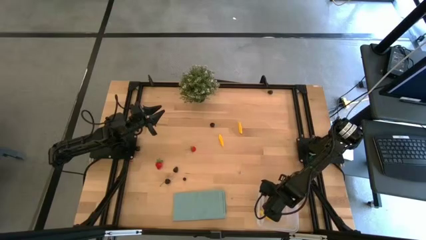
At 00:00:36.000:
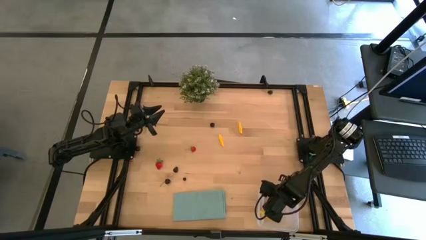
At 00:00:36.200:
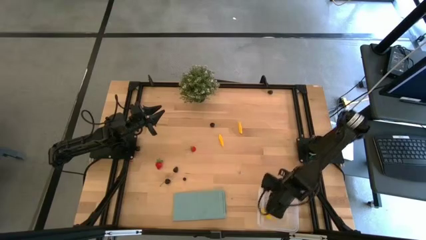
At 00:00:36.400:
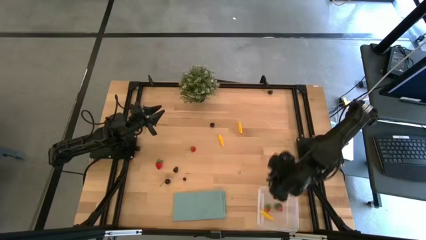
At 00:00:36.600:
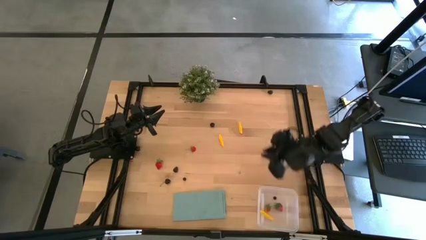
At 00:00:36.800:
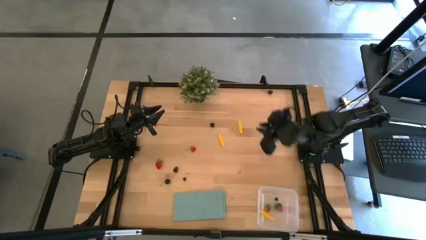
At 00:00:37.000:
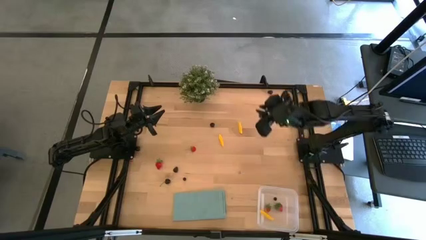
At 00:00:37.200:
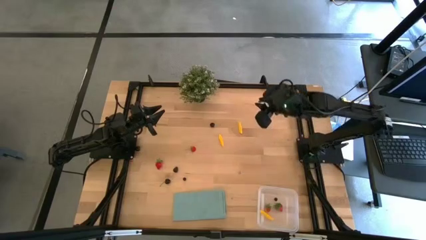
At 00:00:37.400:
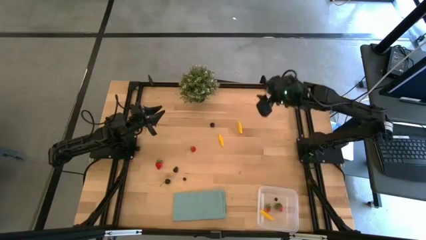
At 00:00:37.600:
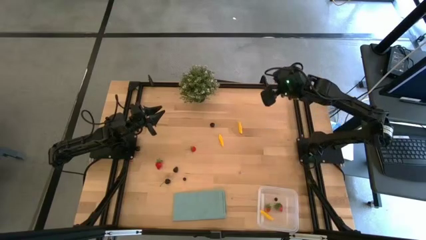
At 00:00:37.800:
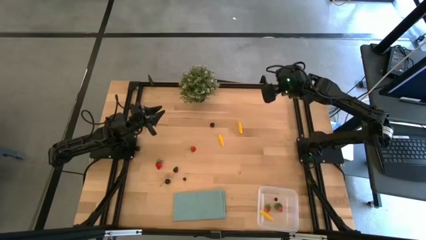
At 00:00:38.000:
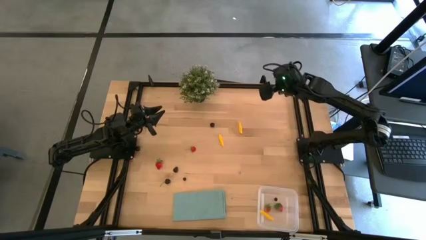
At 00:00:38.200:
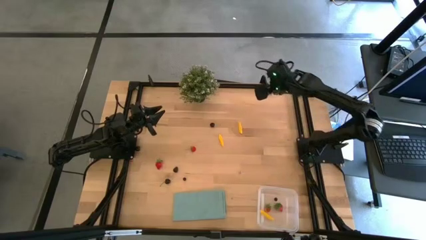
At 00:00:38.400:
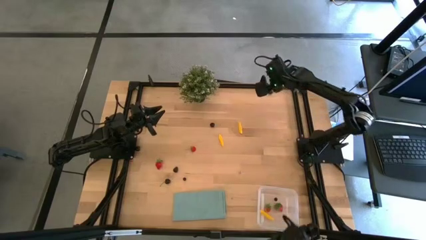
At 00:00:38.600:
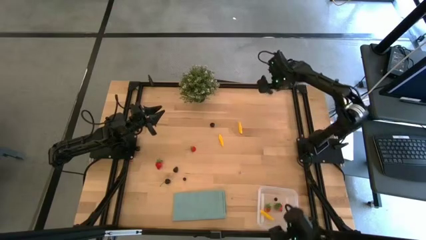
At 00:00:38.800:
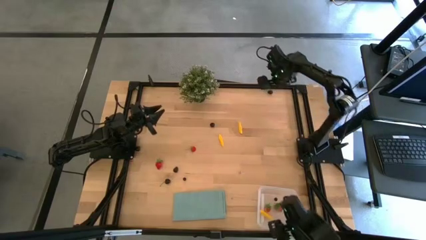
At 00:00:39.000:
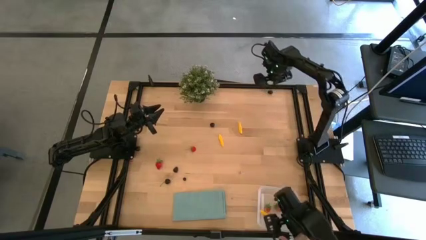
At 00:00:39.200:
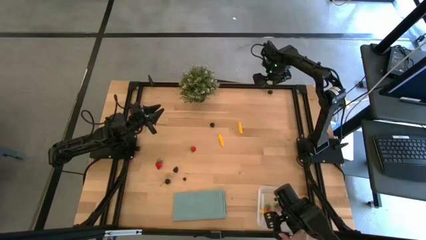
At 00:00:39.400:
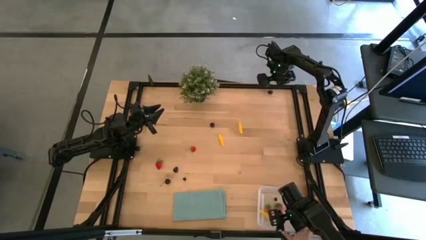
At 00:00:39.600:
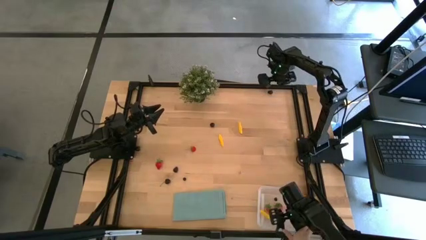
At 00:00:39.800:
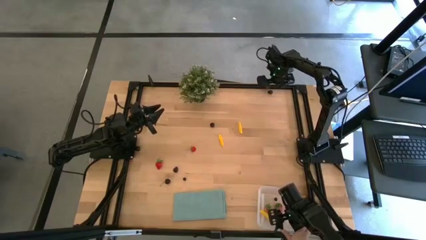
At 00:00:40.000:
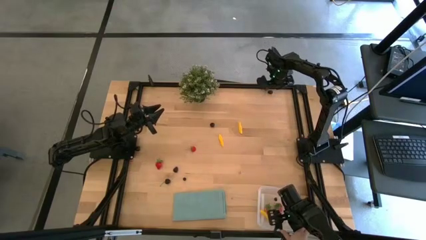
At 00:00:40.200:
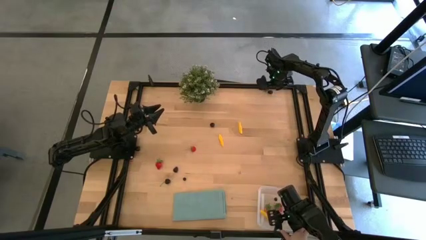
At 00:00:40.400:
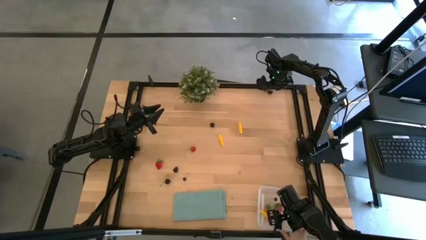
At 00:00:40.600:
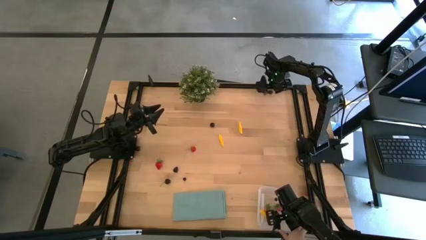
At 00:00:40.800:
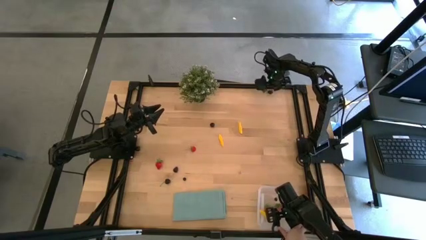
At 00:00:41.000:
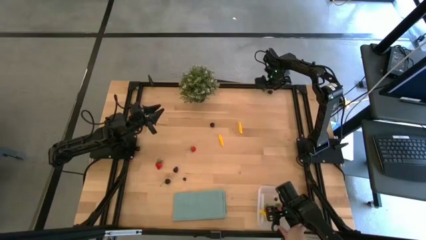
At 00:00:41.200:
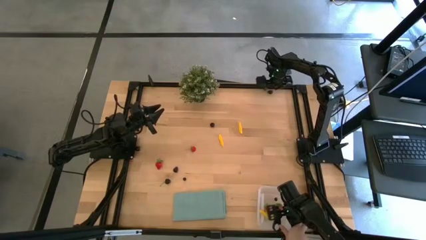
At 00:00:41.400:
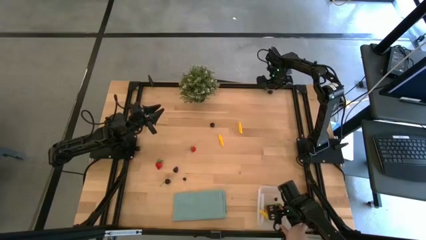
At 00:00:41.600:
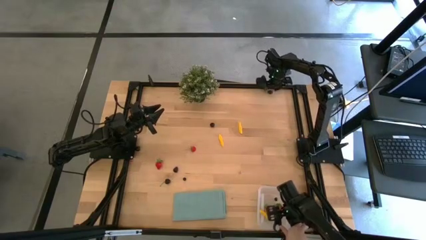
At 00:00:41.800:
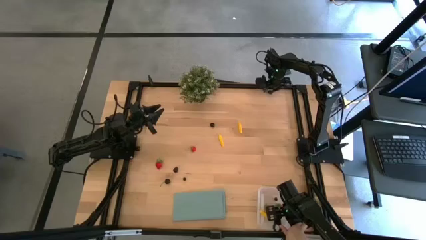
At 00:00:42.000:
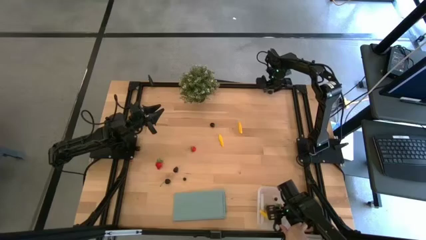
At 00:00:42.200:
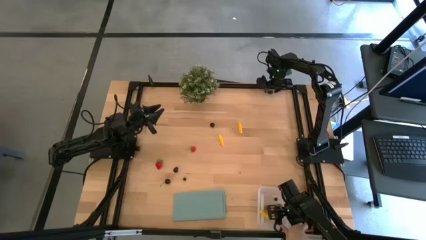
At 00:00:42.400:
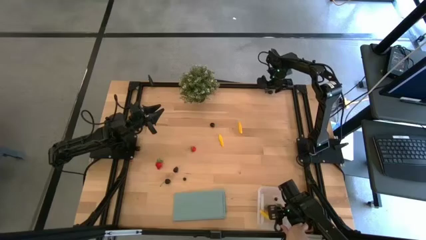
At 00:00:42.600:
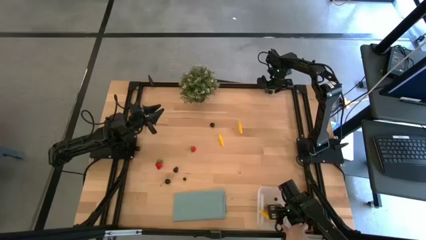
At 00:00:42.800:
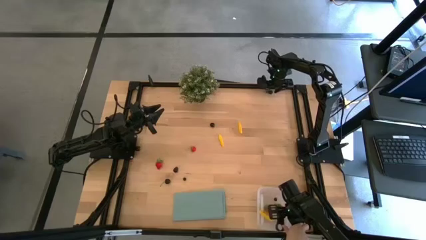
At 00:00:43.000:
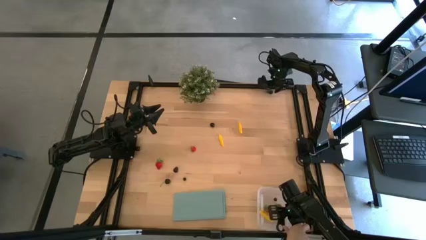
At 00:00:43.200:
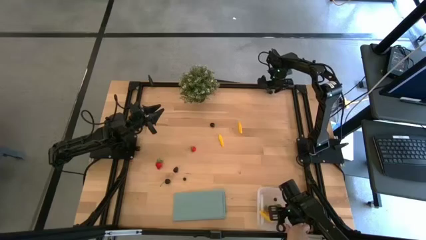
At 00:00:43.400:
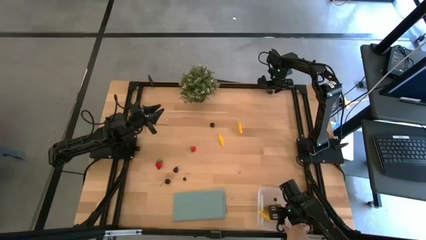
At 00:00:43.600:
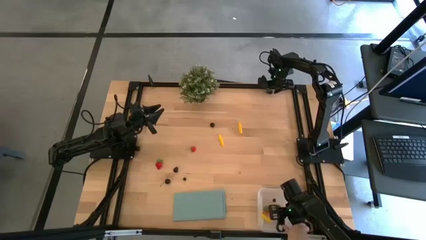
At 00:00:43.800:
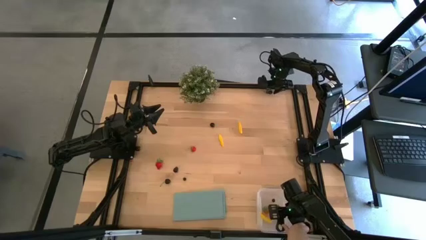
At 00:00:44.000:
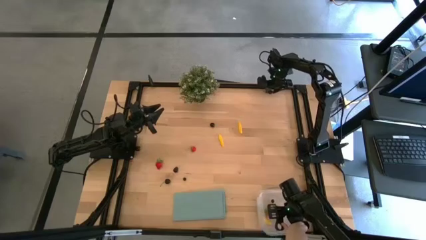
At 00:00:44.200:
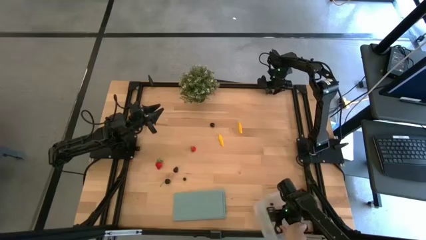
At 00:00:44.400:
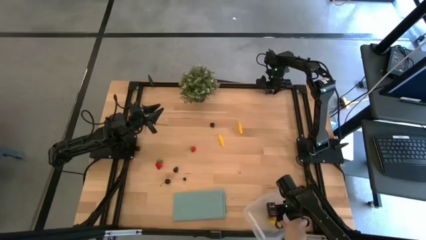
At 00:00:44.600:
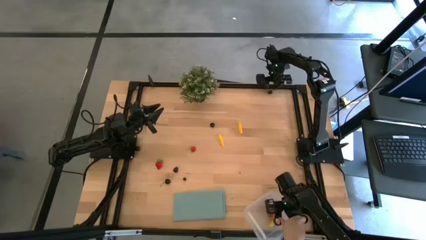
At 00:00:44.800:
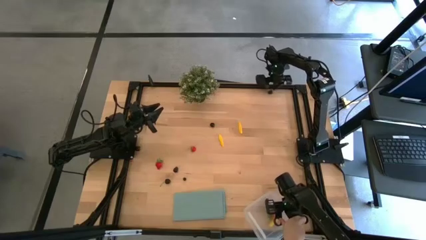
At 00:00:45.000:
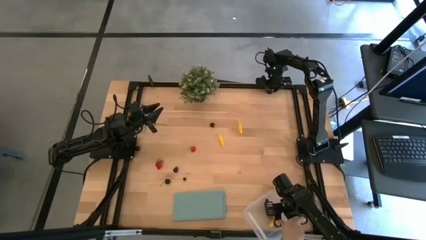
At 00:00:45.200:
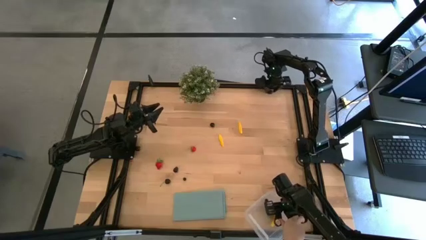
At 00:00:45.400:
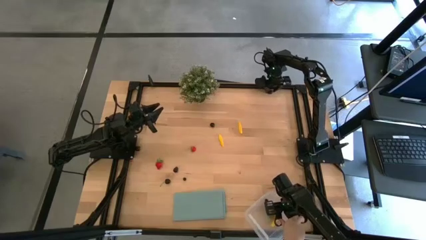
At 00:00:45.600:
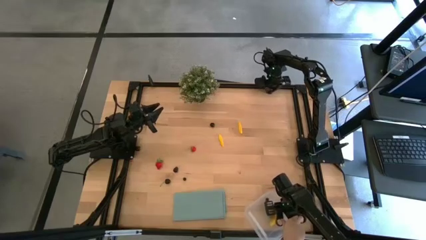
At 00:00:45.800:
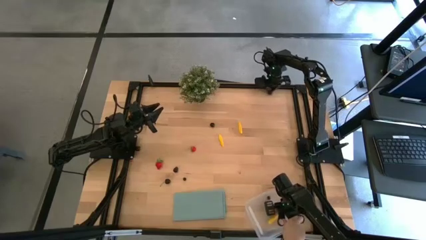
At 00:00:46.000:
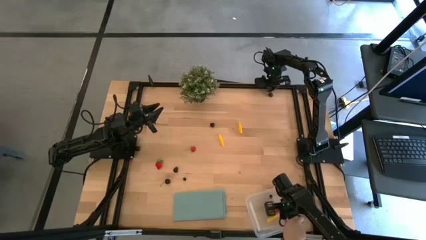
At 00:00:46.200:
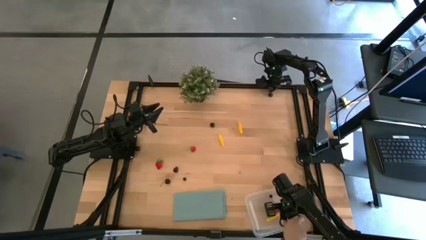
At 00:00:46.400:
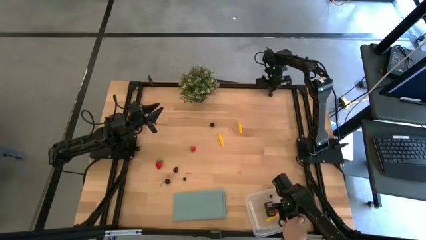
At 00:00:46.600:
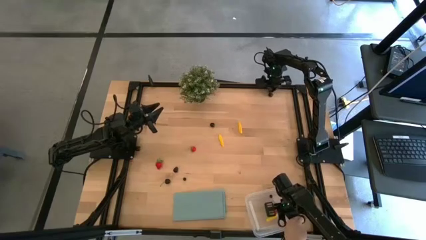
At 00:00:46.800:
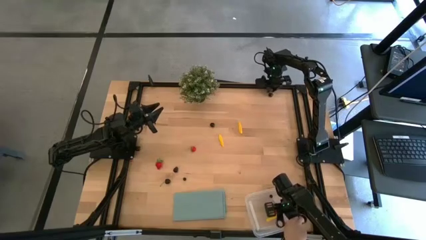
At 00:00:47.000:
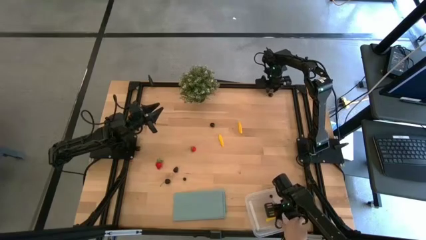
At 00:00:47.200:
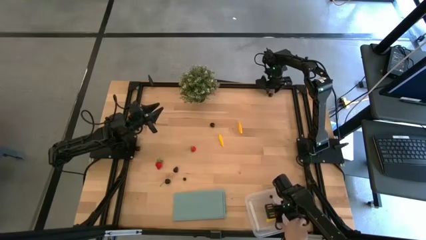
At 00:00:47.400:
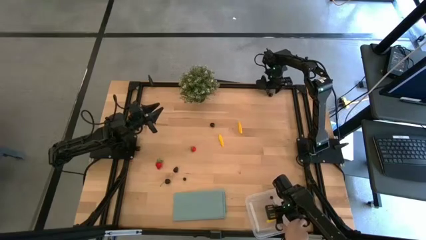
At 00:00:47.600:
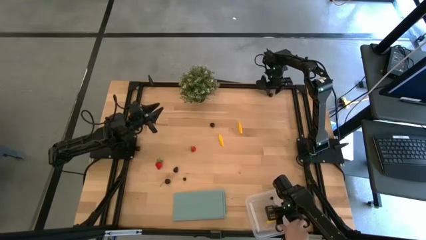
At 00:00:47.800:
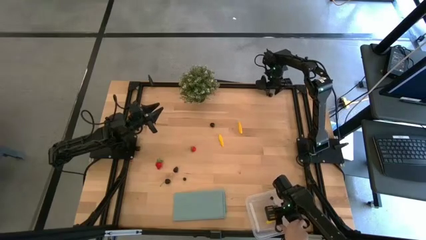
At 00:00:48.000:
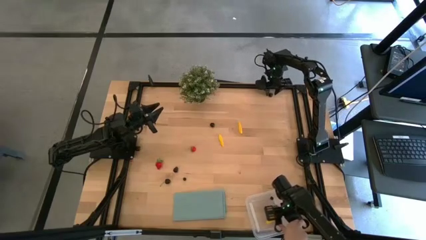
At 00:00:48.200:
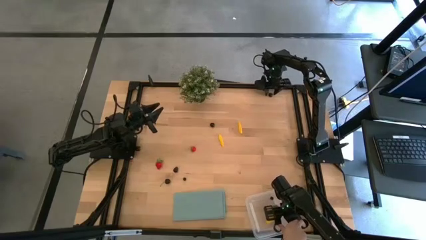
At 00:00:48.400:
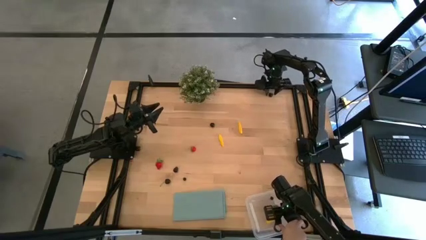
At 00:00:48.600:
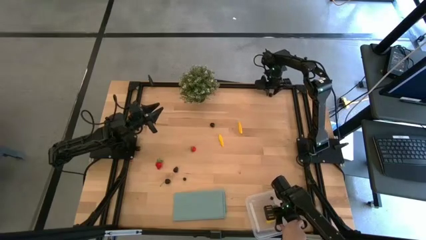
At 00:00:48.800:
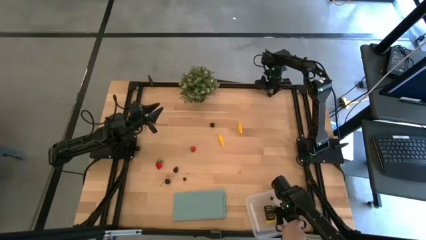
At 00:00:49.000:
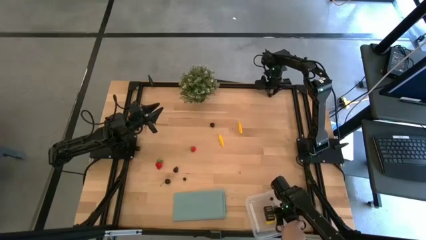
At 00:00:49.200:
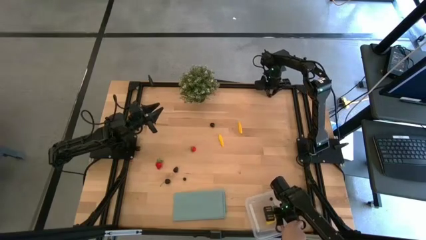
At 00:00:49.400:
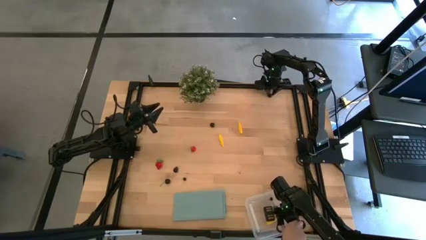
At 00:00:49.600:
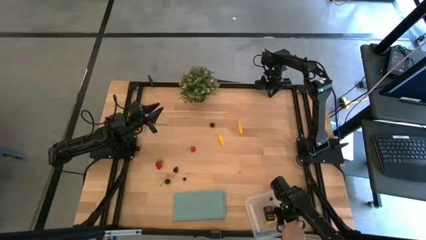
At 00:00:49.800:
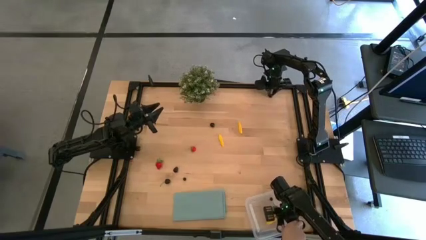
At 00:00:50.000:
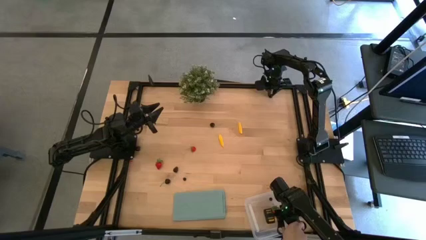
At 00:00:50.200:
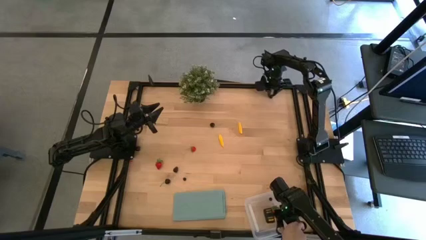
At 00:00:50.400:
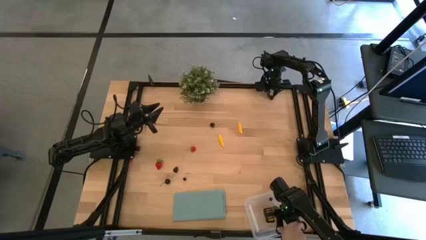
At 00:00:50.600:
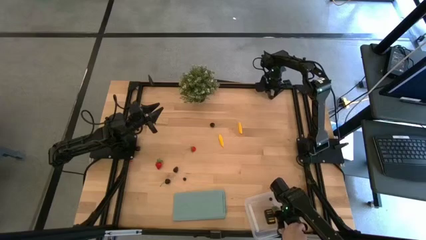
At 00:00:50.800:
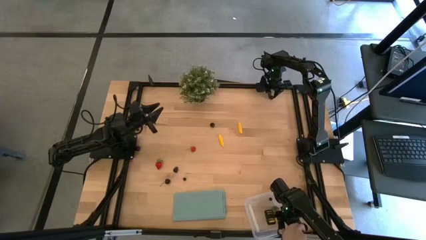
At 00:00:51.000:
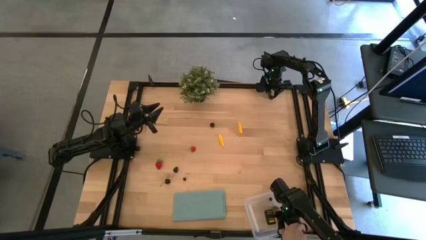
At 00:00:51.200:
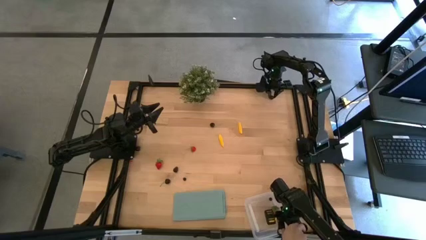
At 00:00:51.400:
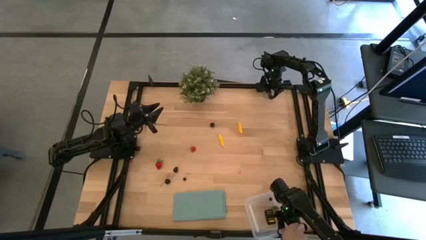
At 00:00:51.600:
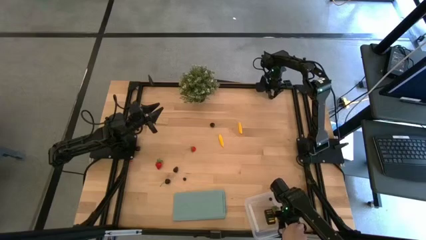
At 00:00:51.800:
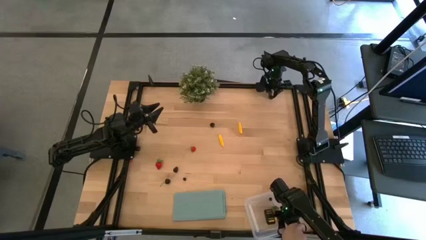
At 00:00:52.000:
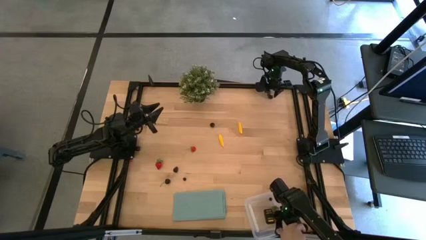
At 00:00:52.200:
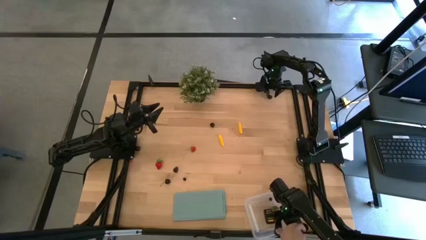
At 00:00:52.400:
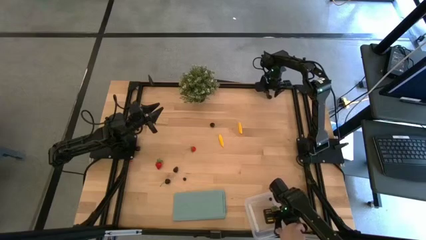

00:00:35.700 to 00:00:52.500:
Task: Pick and placing Produce into tupperware
Put the blackberry into the transparent bin
